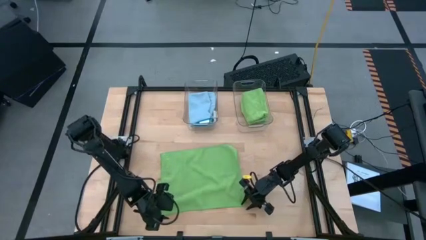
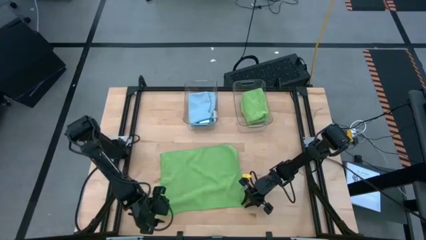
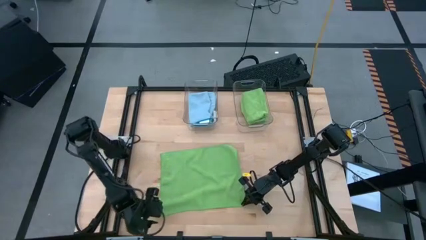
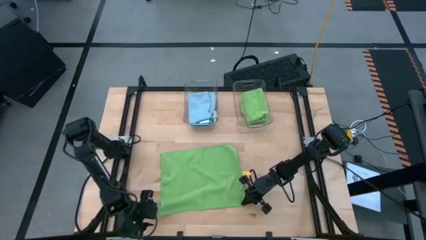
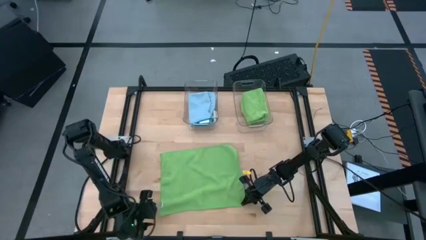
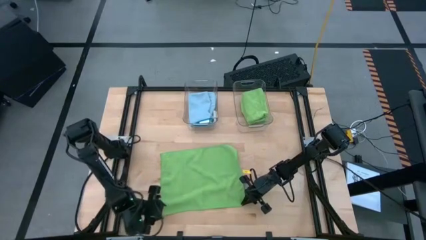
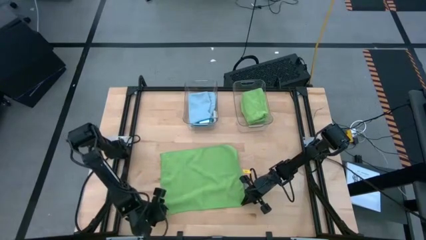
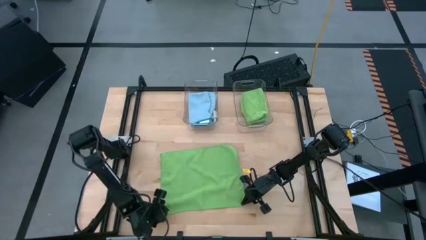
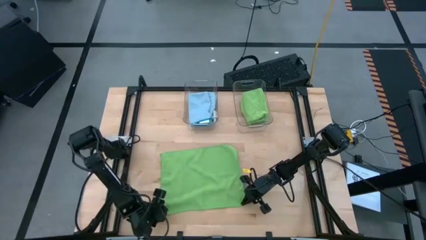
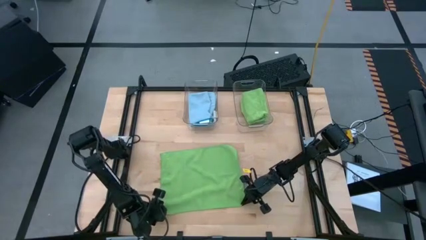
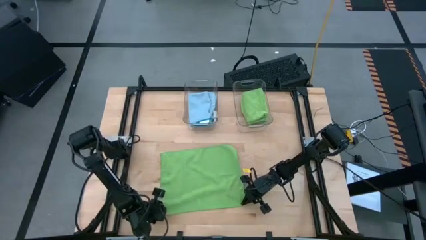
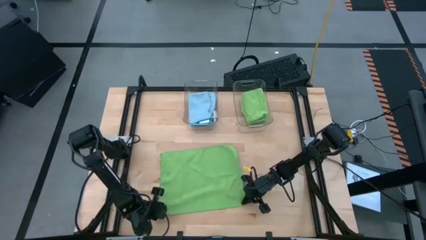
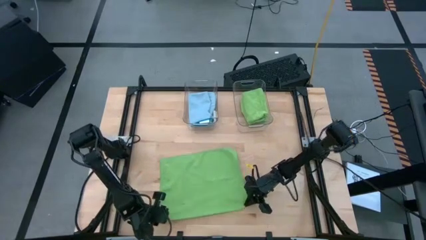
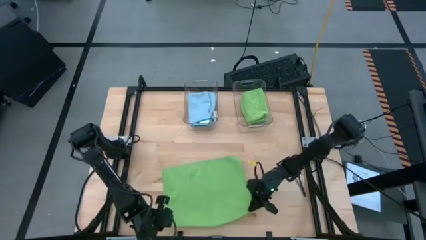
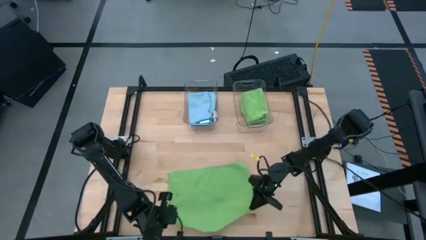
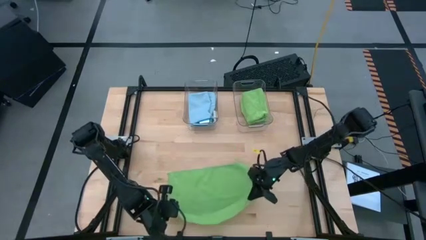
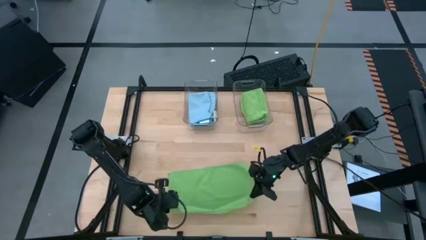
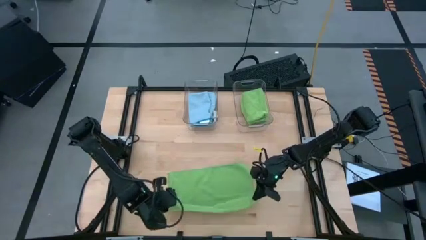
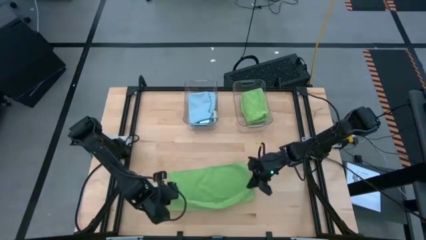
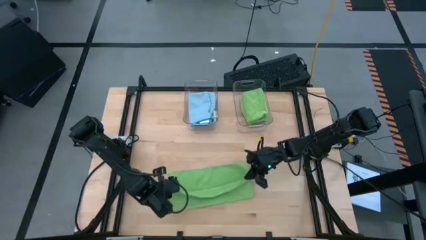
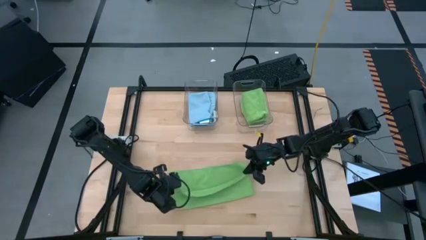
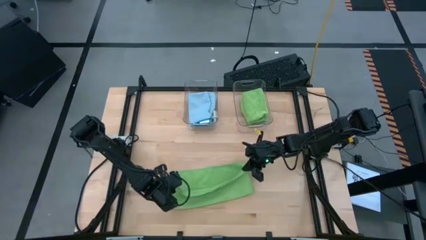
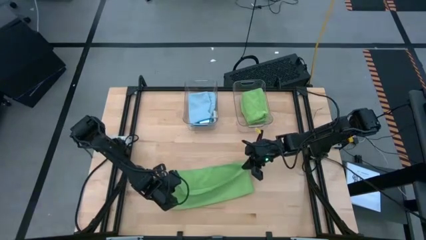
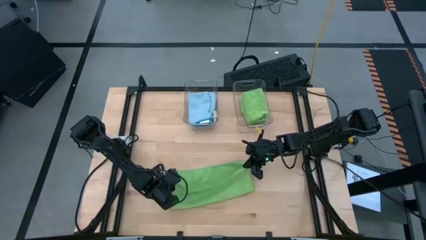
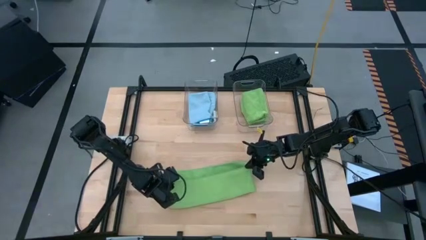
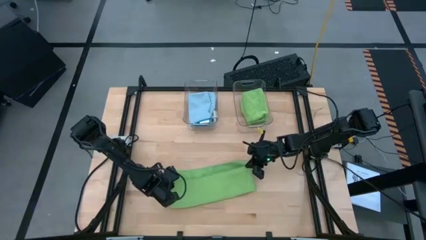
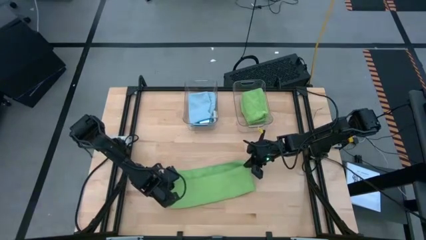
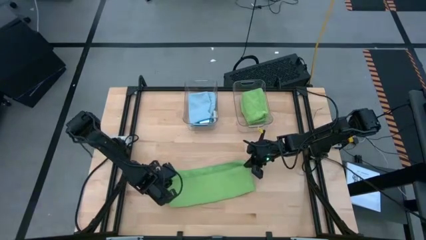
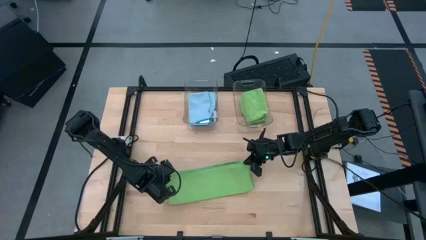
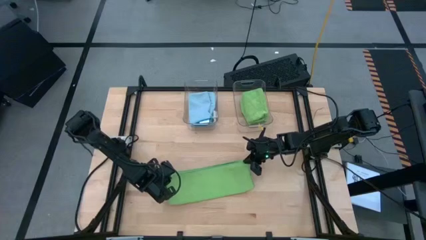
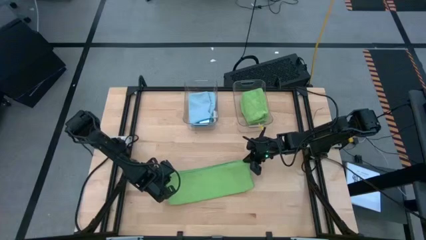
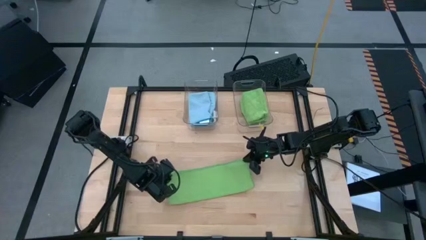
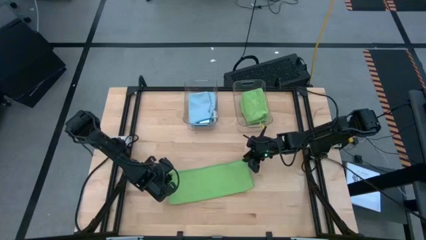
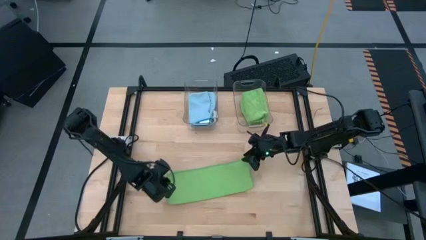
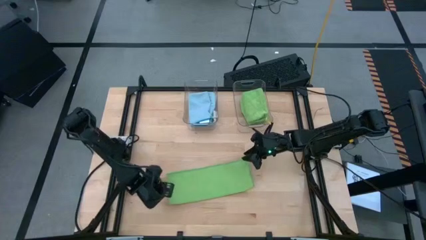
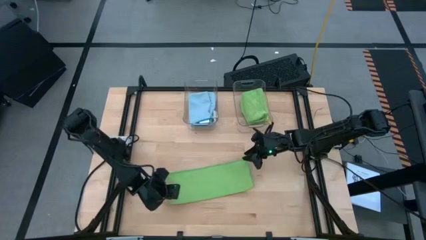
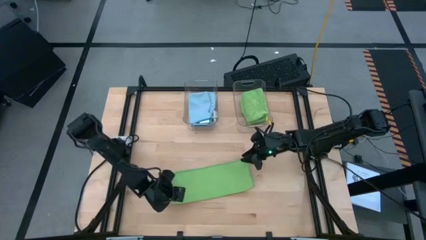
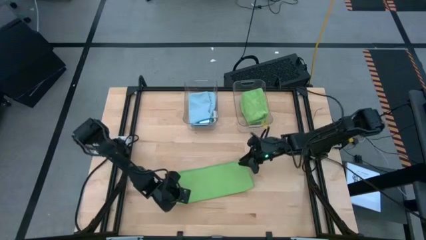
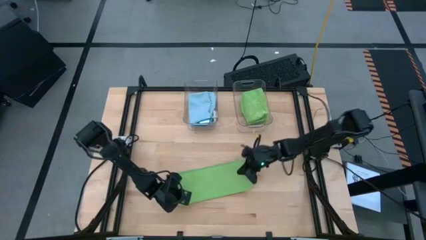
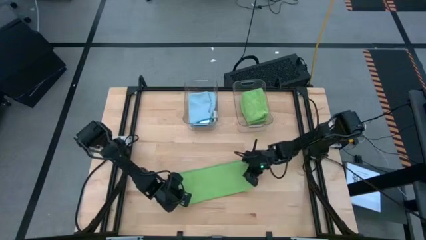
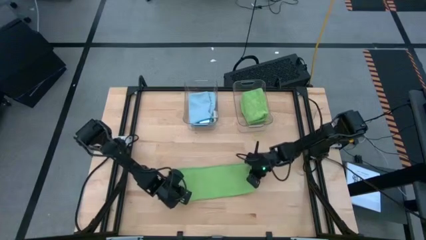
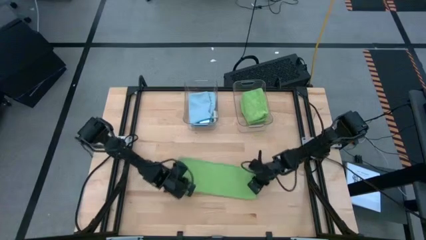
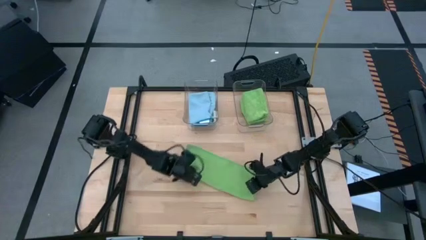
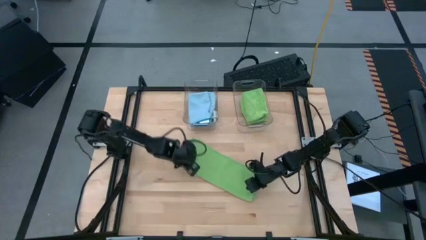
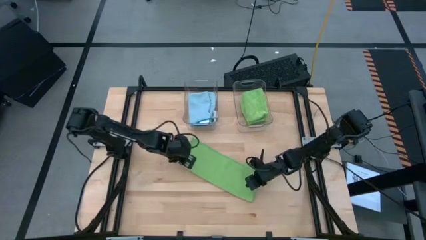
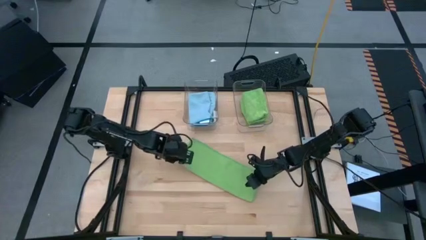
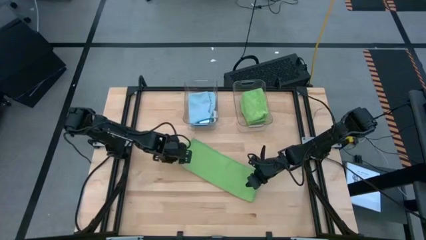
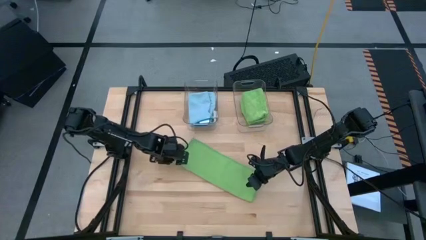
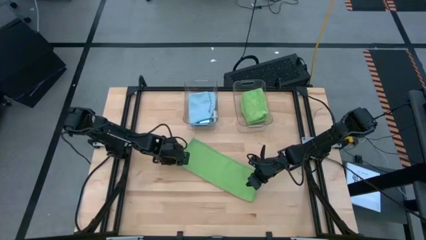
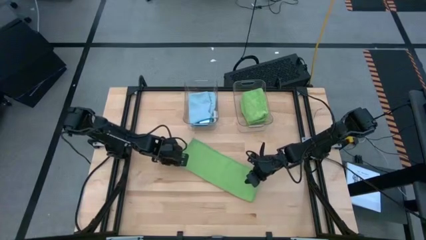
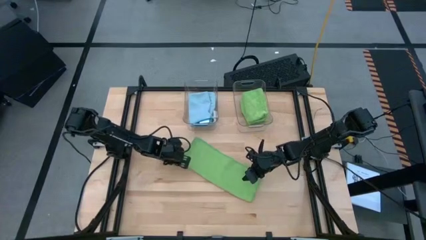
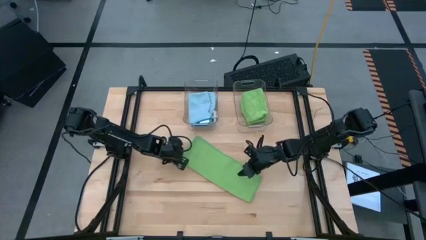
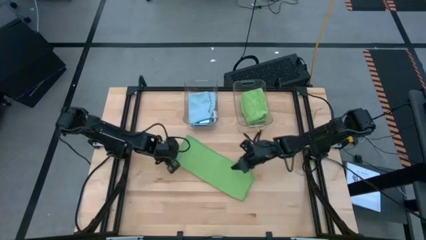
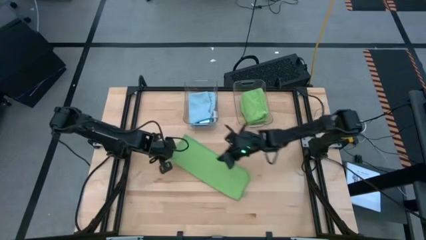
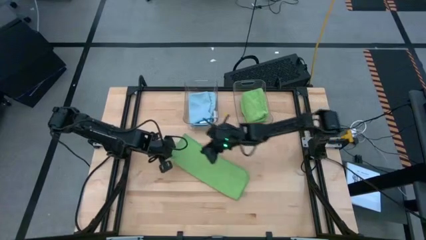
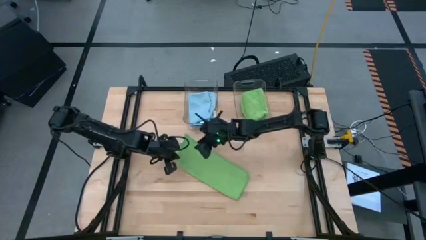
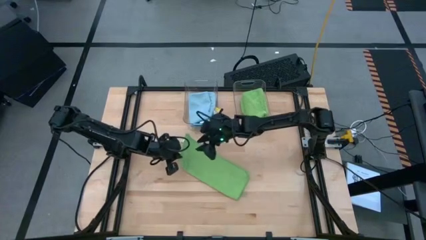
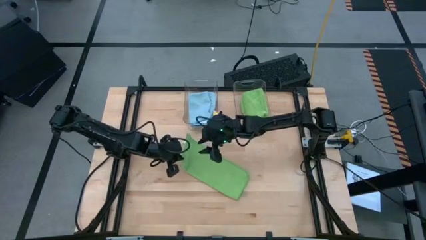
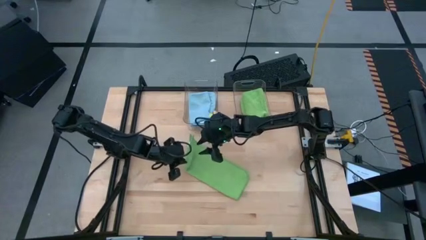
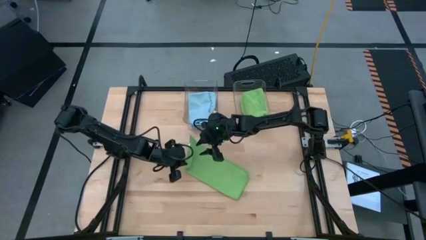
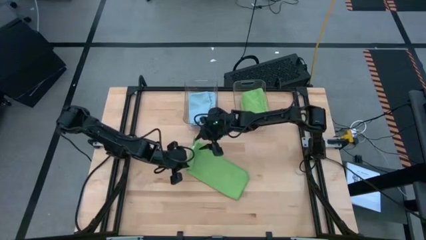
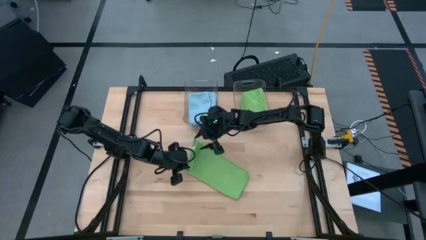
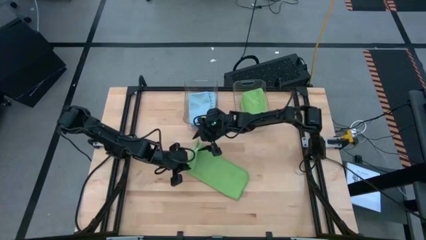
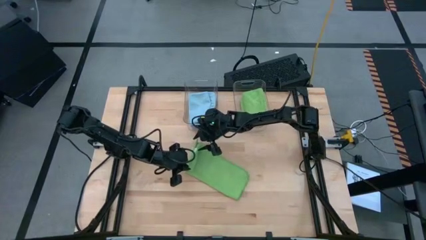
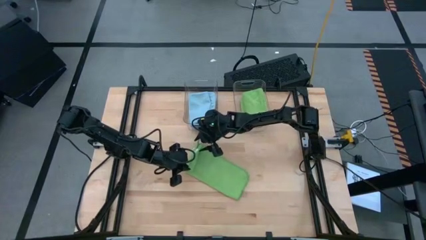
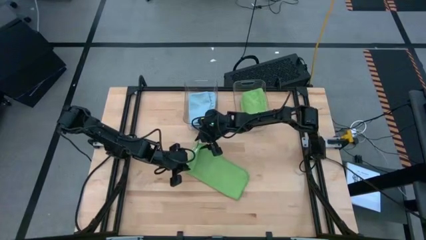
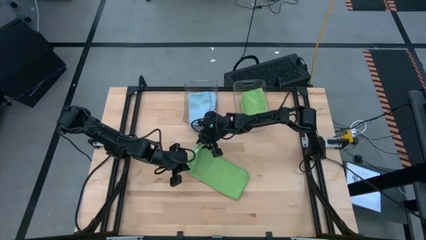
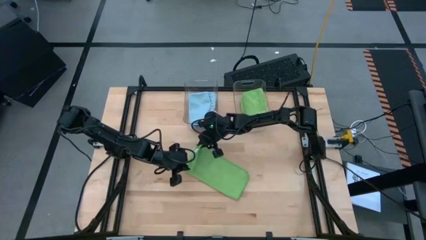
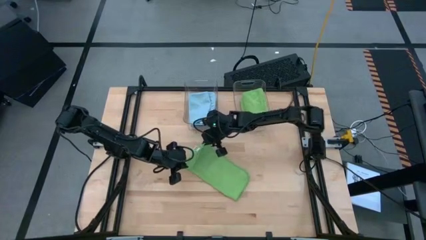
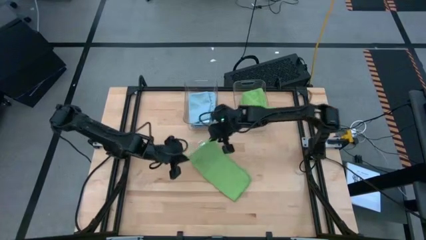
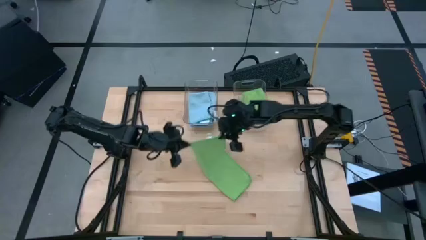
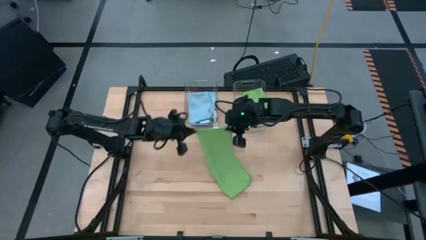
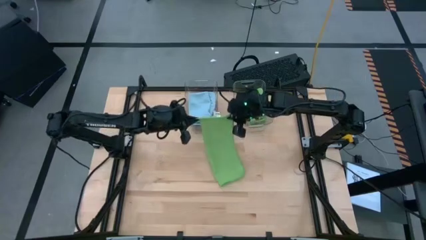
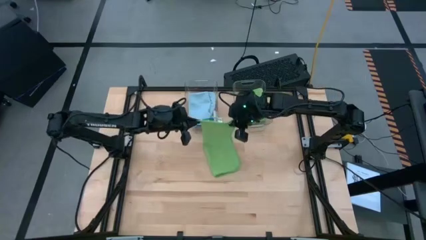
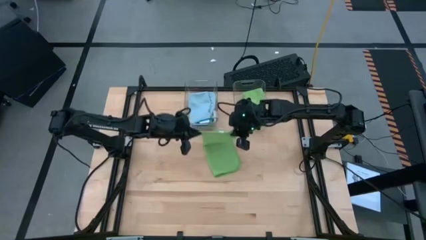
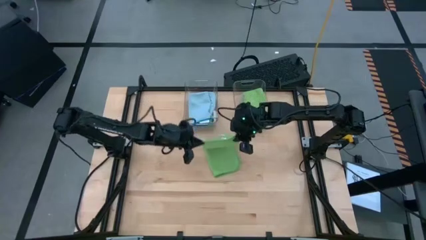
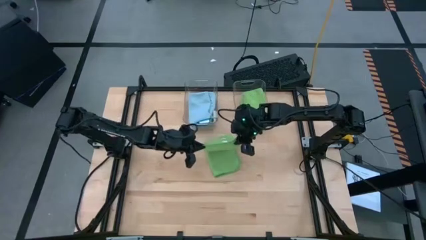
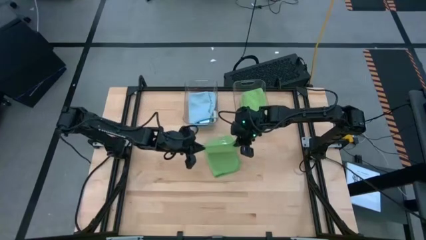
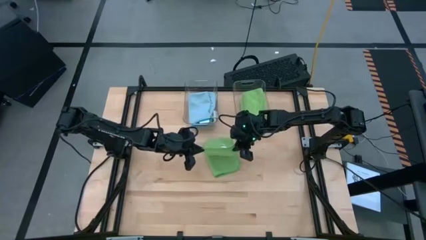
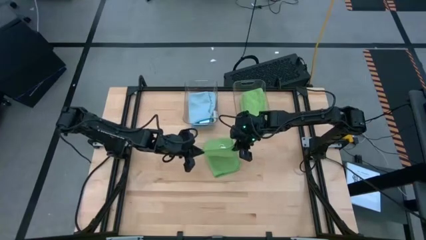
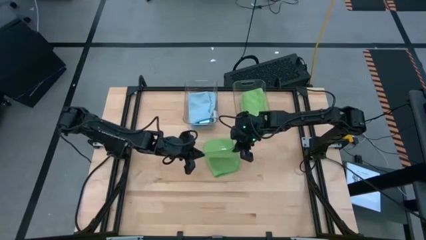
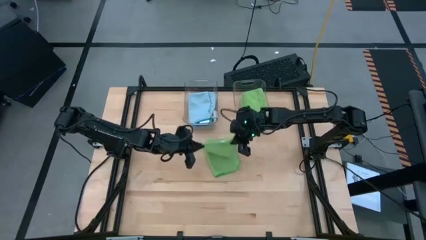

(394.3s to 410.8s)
Task: Fold microfiber towels
Fold the green microfiber towel
